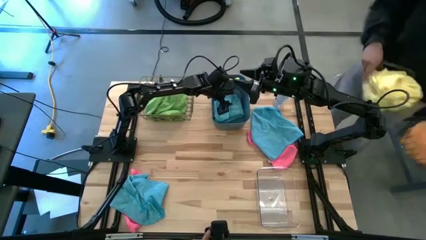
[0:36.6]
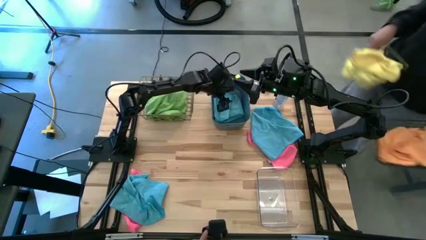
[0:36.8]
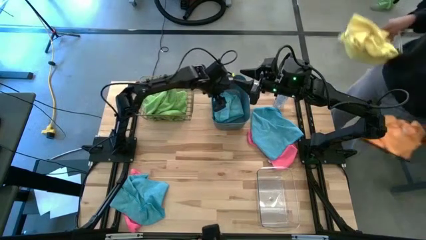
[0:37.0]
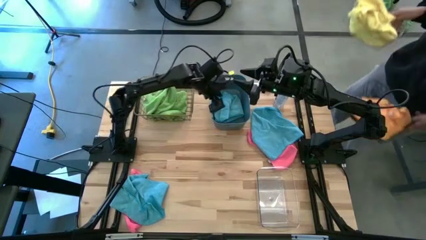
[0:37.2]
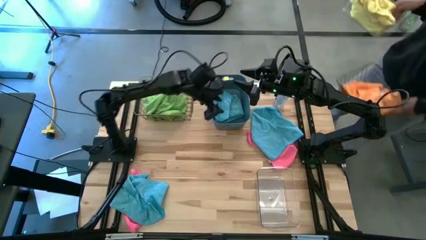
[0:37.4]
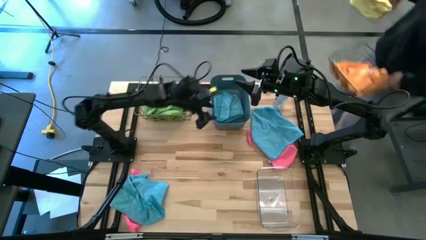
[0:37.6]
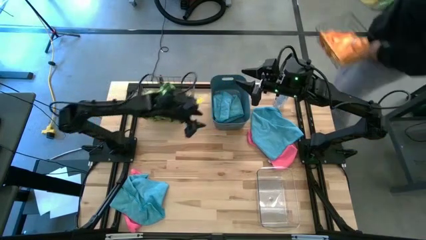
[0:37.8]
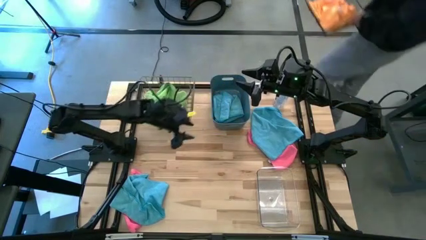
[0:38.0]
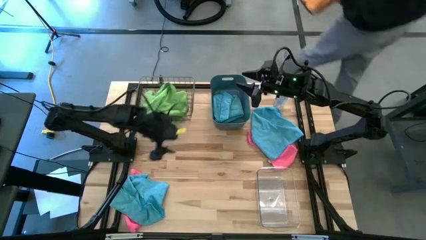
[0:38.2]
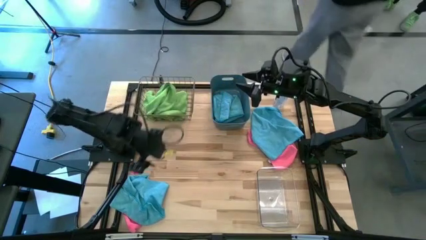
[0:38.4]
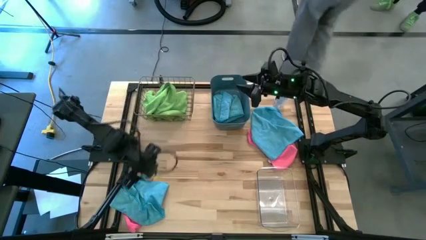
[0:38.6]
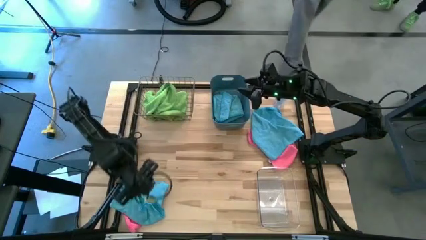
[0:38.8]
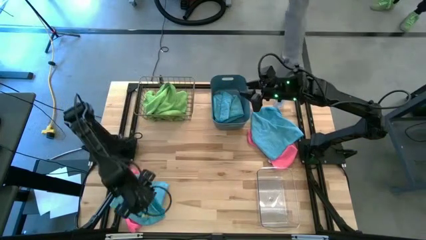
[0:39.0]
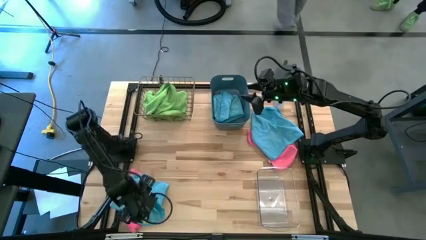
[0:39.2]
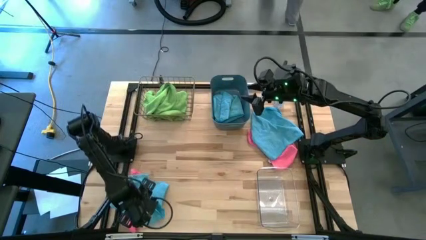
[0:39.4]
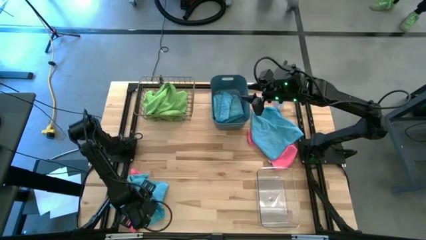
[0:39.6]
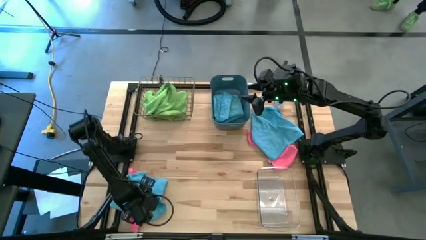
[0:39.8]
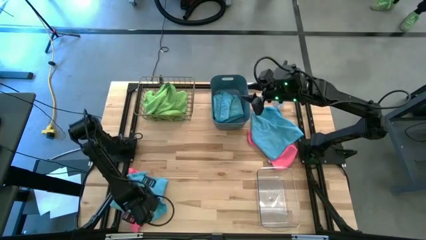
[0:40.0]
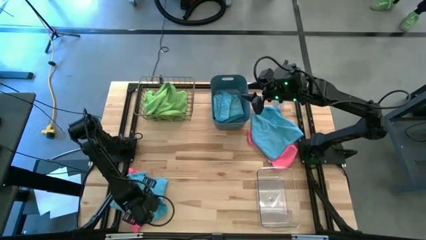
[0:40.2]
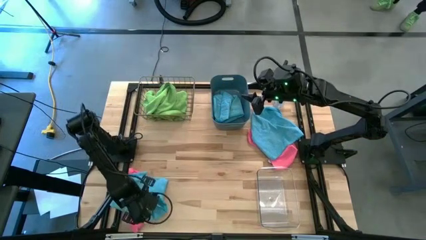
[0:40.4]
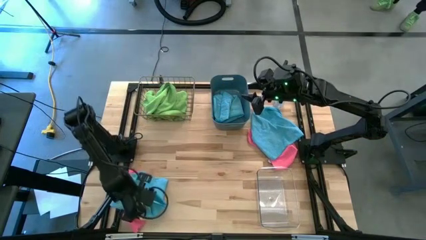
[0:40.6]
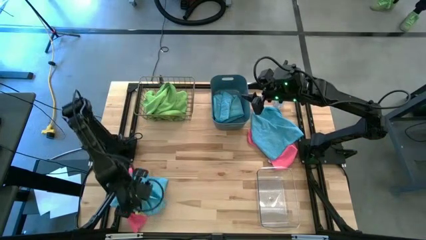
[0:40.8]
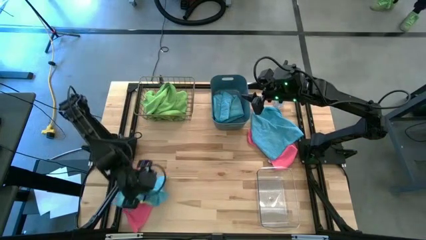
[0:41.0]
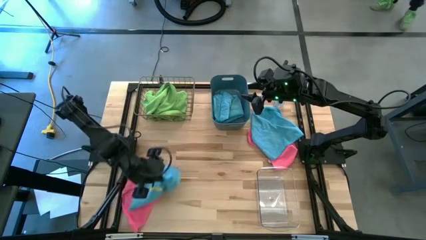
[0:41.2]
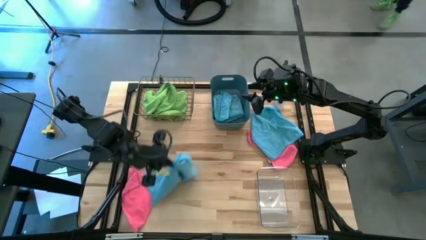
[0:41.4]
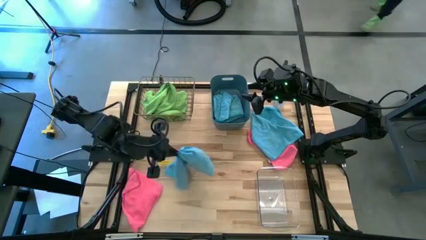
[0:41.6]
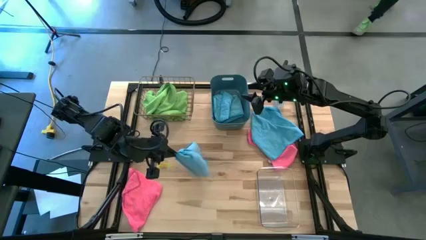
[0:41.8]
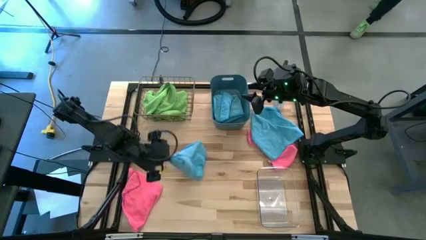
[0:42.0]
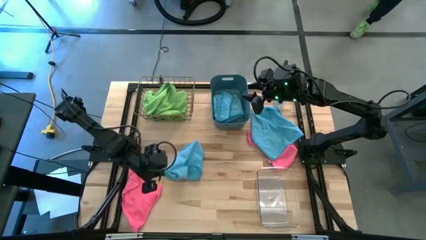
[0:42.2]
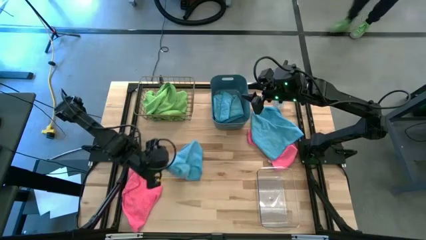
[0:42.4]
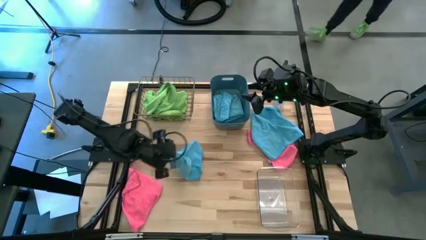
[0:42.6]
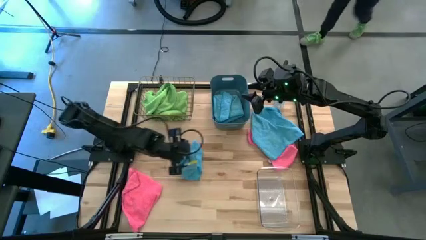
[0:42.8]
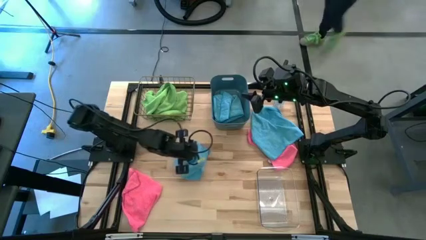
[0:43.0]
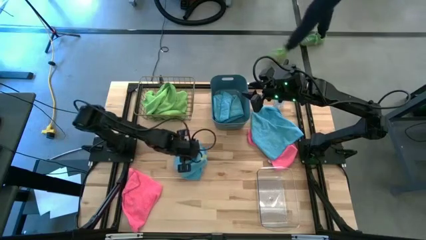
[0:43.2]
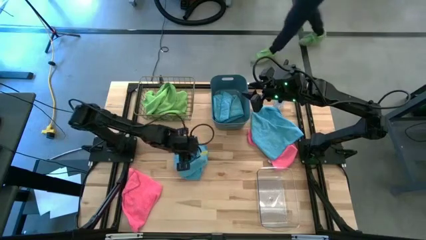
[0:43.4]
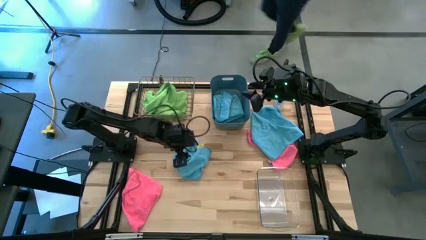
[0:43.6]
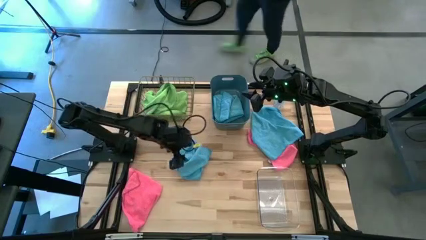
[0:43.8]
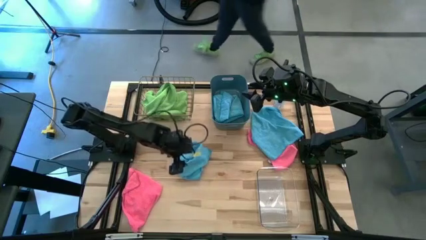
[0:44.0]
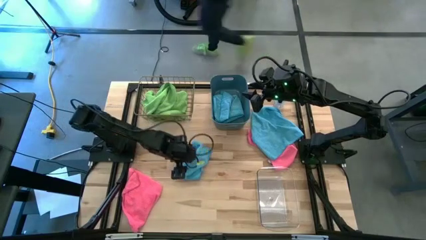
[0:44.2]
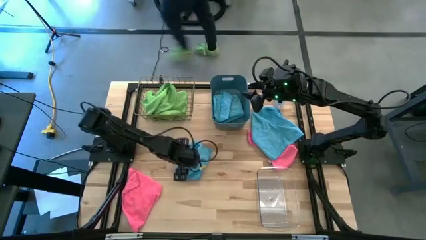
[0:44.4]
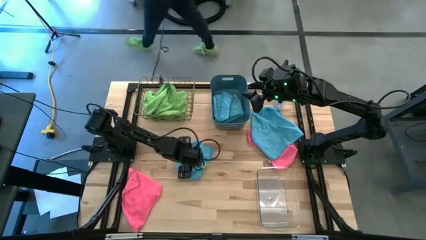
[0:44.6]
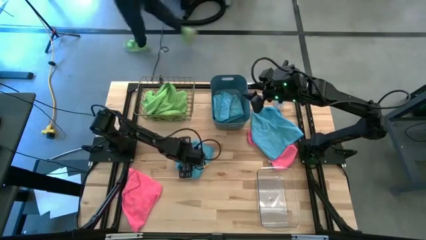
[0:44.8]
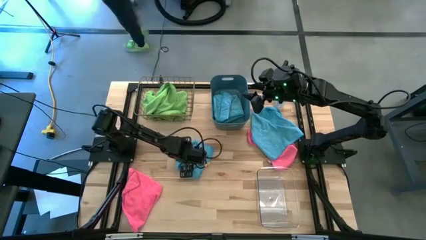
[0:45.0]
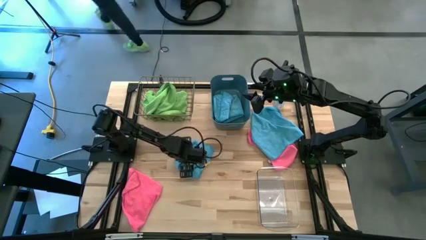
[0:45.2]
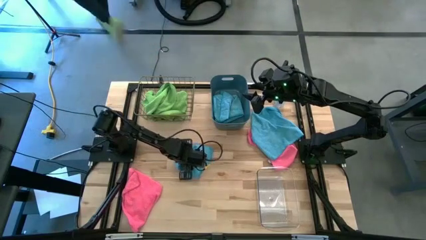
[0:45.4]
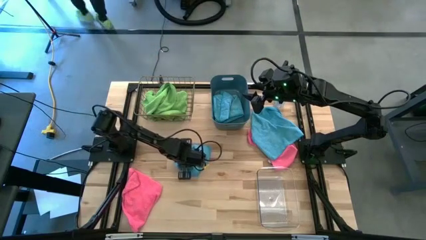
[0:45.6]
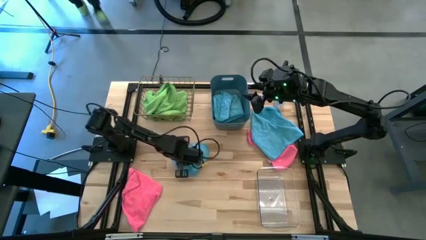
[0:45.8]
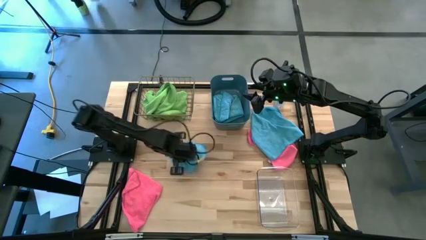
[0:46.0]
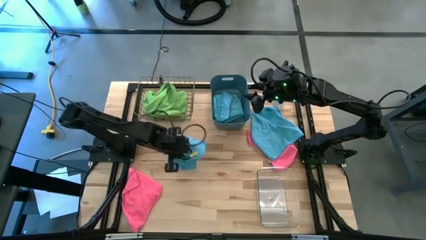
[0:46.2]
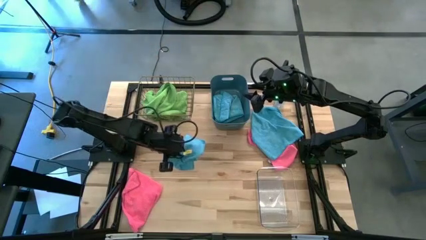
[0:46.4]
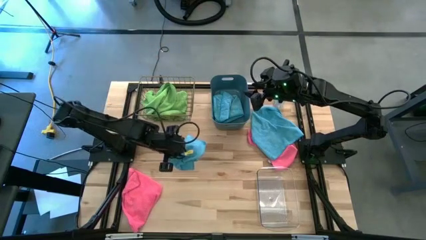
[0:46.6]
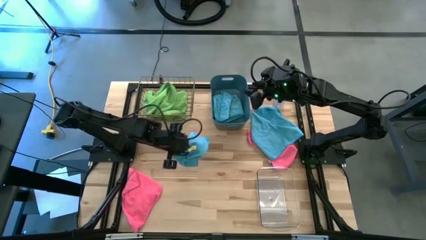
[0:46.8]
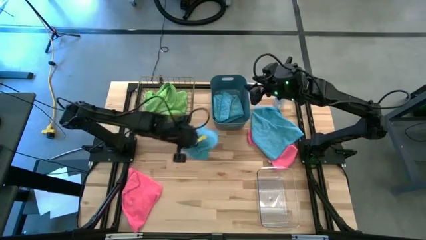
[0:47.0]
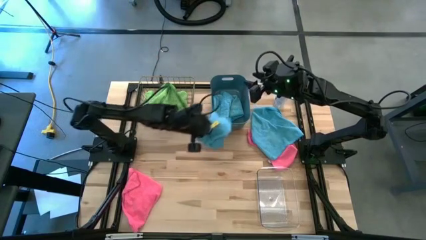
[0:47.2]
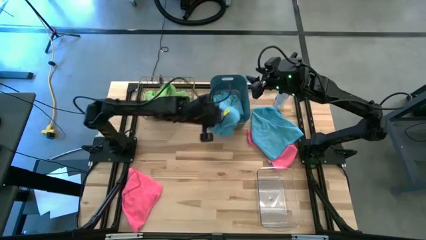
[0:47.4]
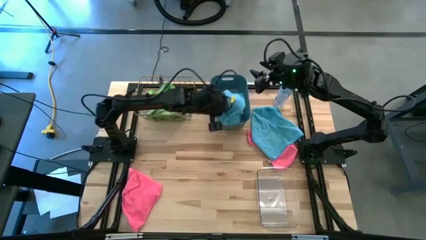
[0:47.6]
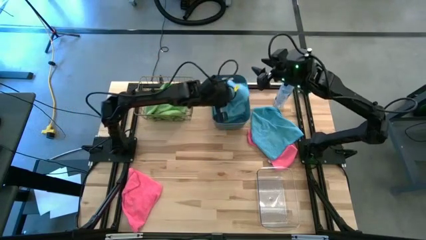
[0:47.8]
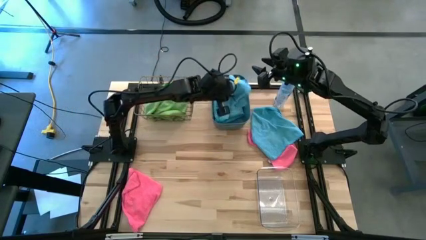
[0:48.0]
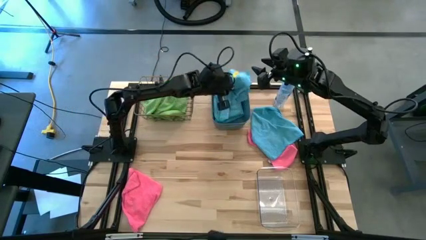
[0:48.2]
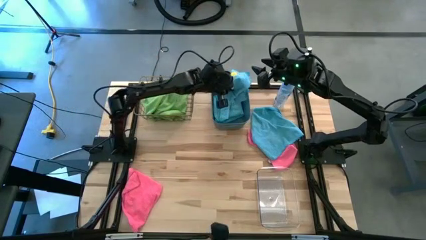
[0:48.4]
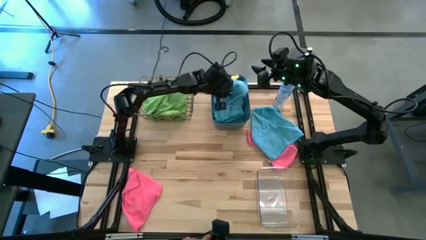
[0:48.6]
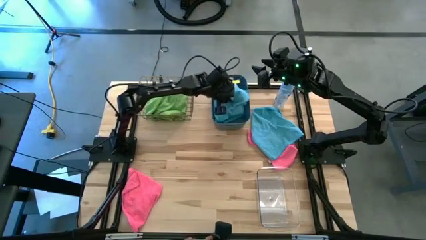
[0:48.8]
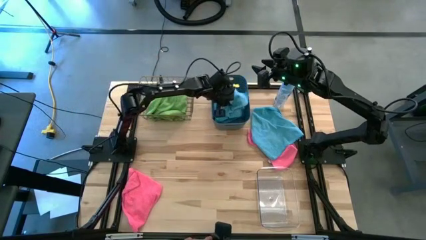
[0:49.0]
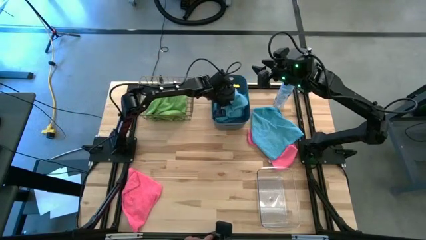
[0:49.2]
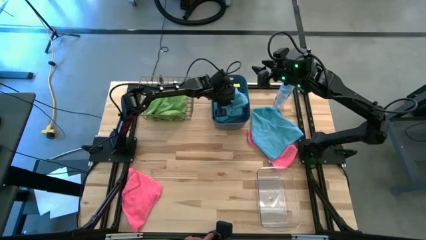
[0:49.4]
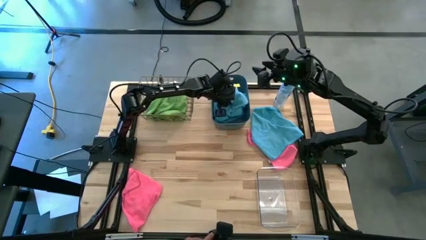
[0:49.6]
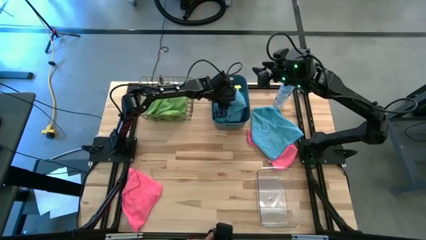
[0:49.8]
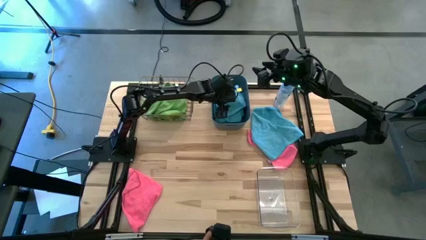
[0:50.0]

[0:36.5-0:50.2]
Task: Sort microfiber towel by color & place in baskets
Put the bottom blue microfiber cloth into the blue bin

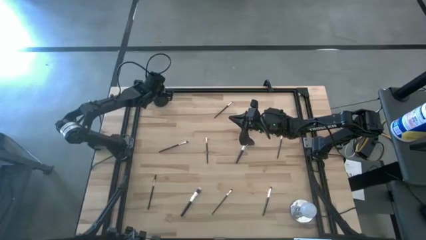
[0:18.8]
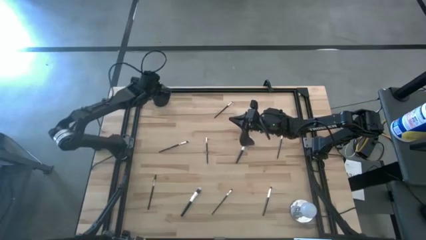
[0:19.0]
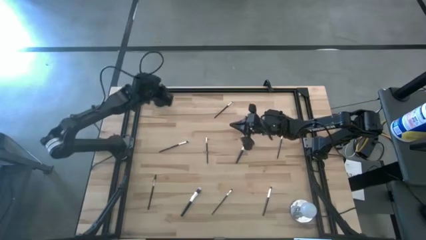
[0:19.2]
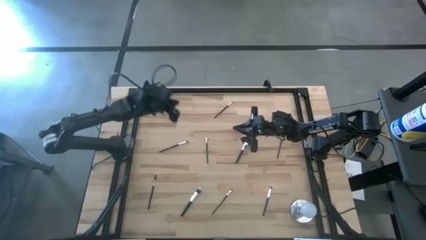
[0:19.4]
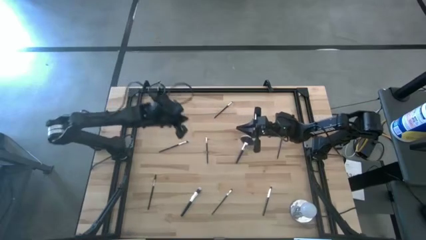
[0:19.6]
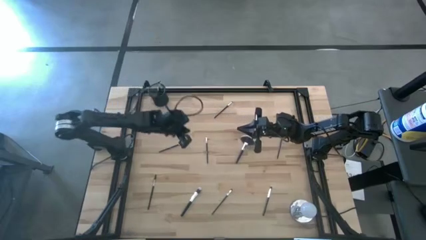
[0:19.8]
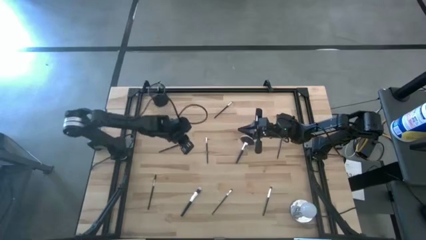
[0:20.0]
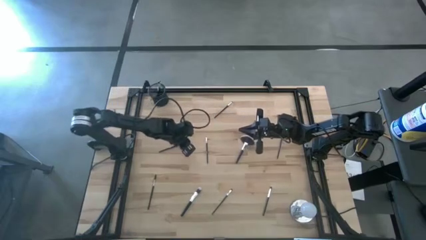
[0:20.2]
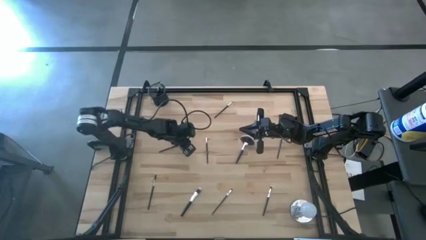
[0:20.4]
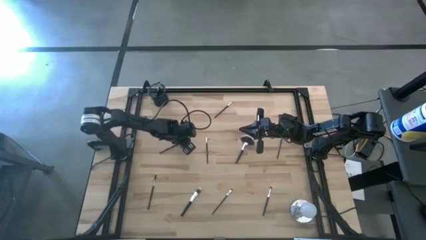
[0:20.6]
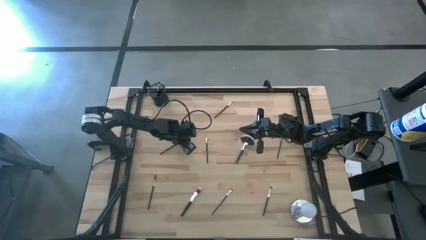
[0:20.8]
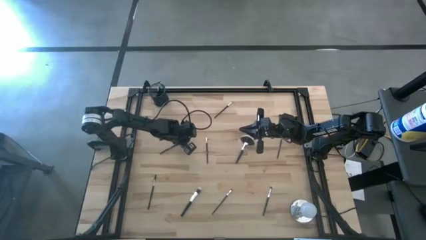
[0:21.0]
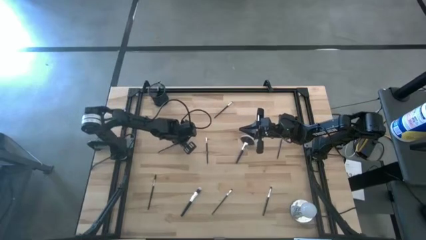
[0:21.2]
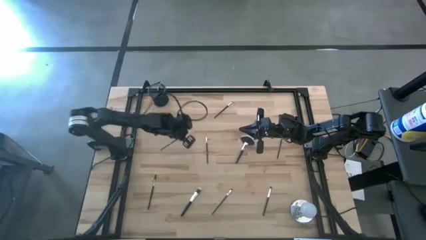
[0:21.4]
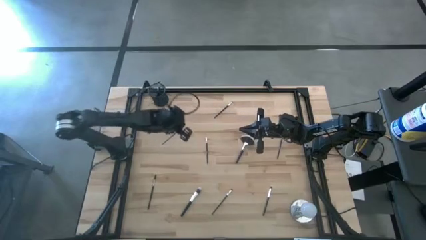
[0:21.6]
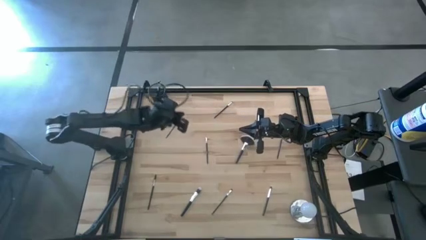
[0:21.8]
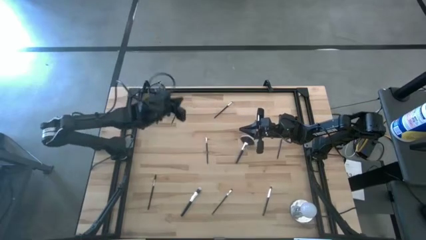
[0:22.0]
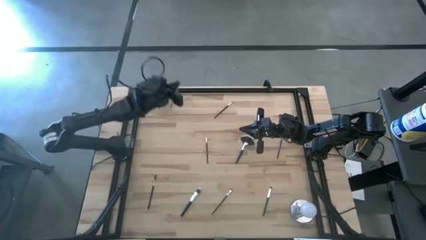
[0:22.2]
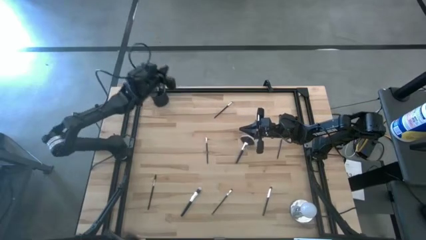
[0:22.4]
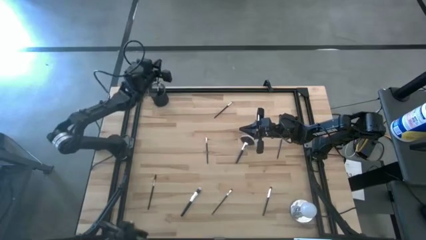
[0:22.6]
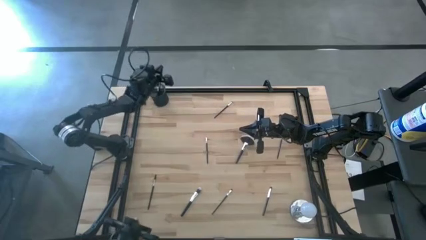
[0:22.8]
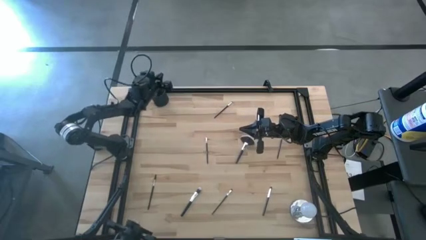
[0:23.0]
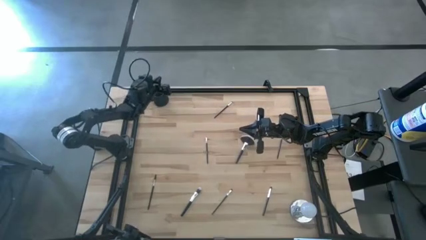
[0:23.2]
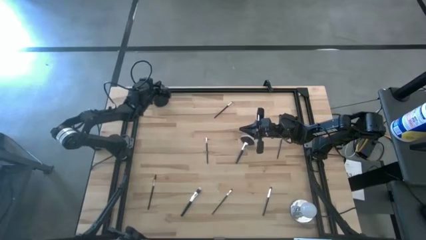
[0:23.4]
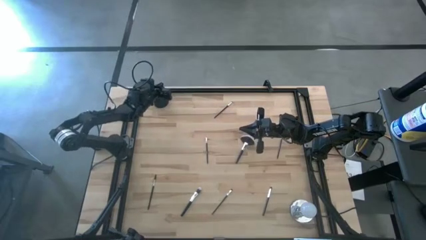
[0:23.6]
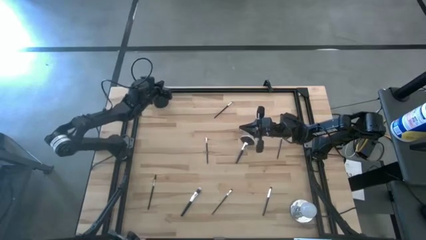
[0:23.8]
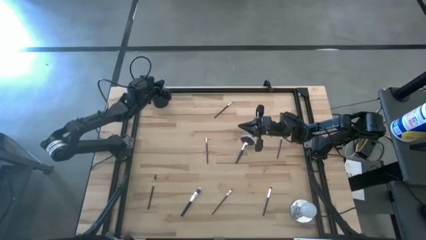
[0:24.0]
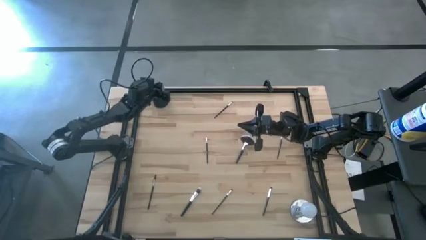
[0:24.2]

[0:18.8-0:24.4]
Task: Put items in baskets/containers
Put the eyeshadow brush into the holder
